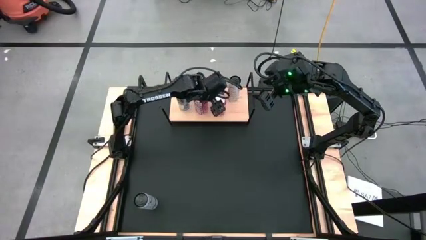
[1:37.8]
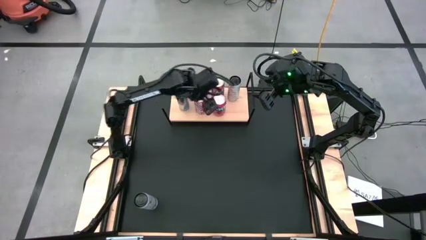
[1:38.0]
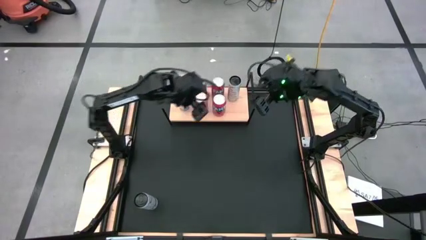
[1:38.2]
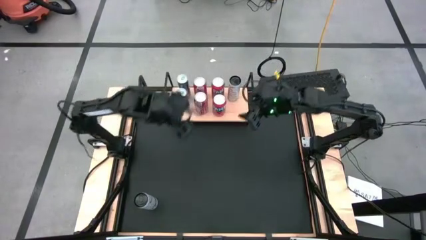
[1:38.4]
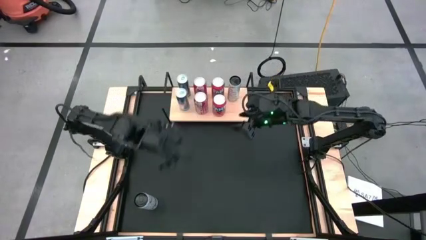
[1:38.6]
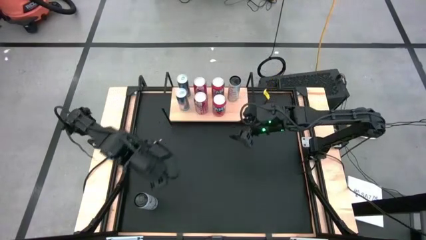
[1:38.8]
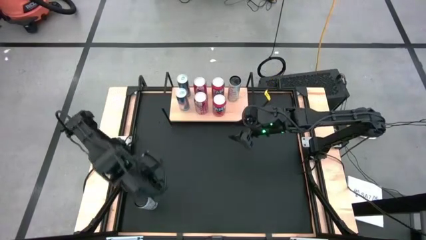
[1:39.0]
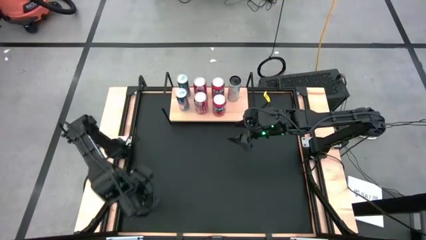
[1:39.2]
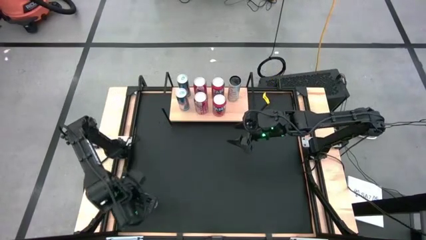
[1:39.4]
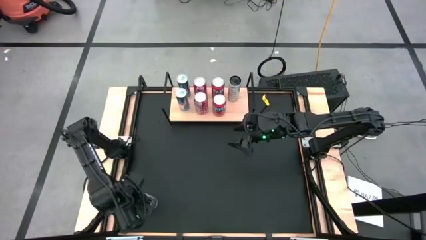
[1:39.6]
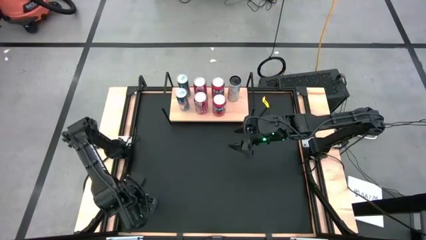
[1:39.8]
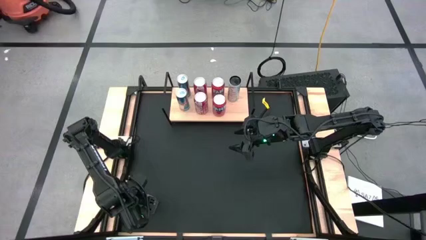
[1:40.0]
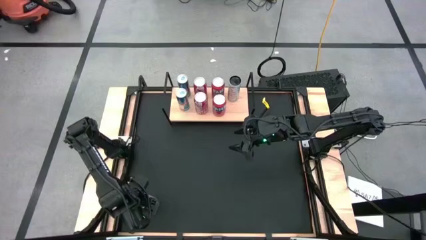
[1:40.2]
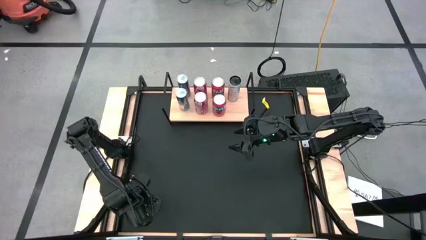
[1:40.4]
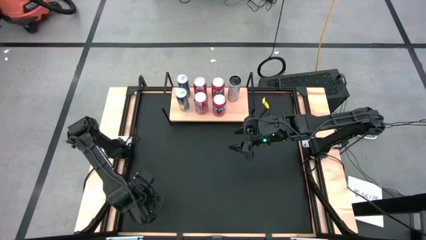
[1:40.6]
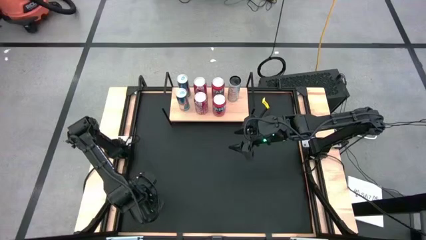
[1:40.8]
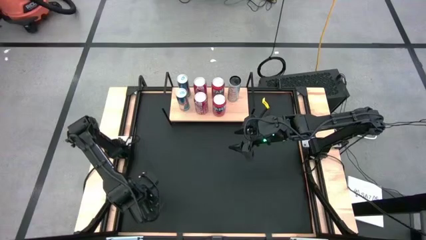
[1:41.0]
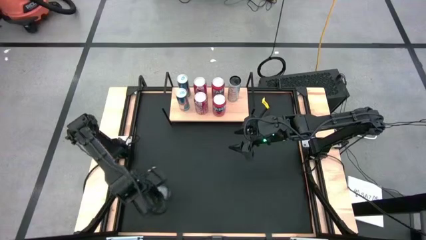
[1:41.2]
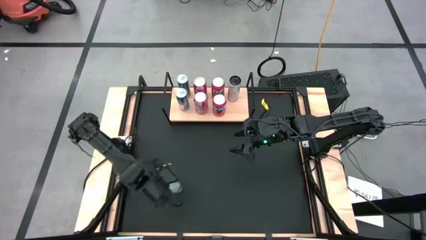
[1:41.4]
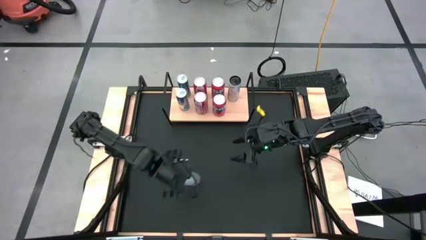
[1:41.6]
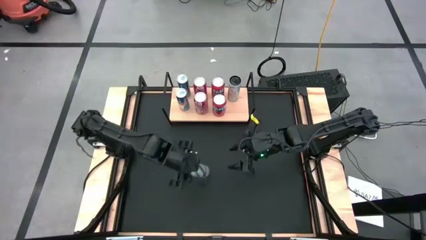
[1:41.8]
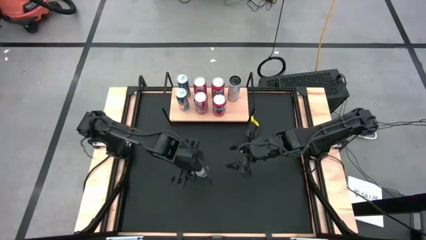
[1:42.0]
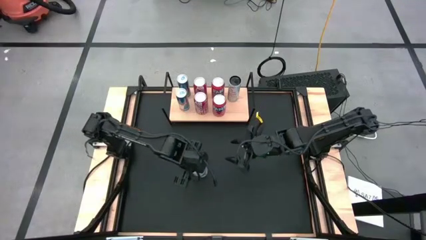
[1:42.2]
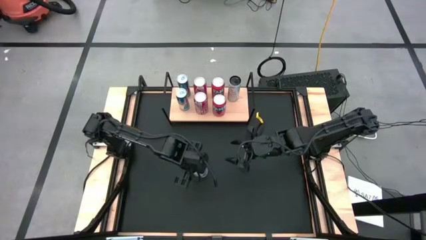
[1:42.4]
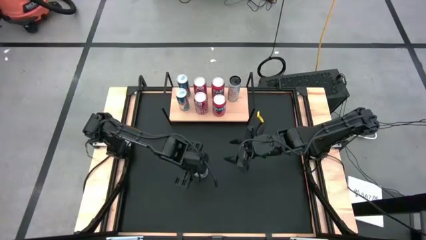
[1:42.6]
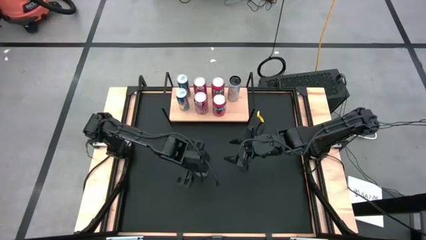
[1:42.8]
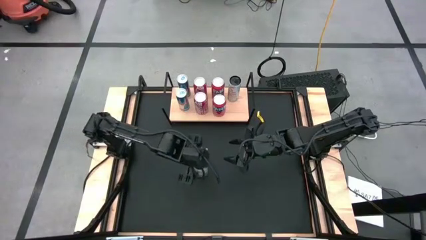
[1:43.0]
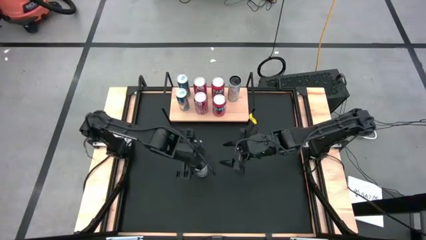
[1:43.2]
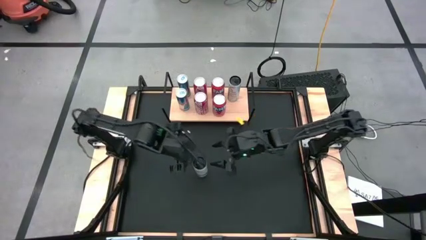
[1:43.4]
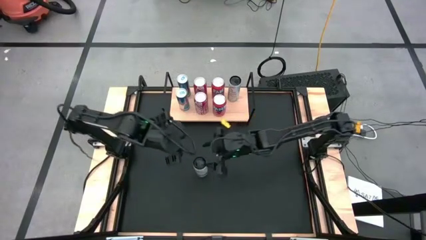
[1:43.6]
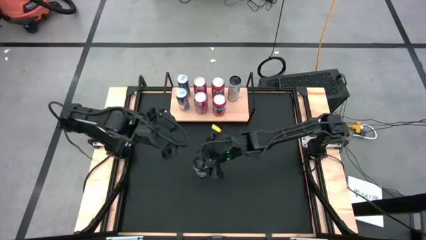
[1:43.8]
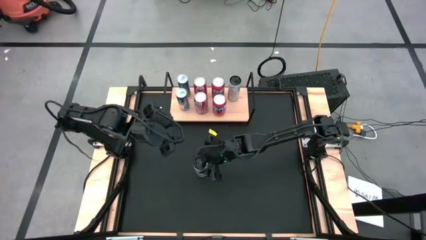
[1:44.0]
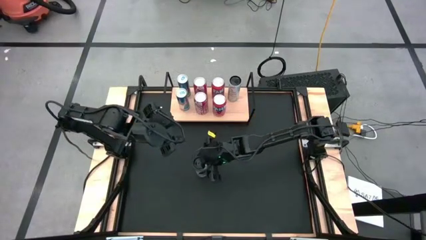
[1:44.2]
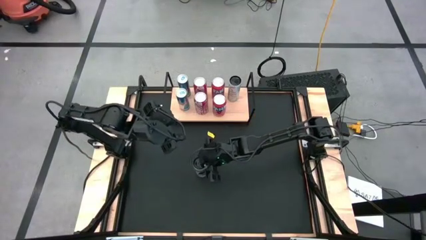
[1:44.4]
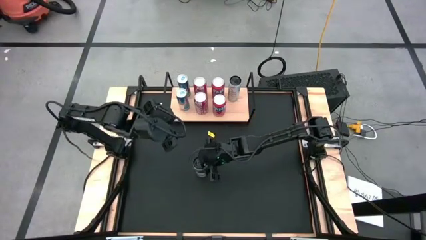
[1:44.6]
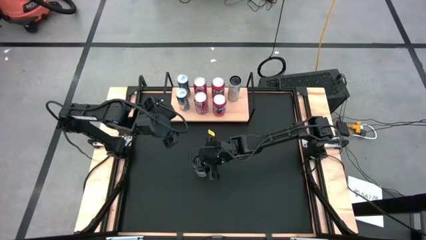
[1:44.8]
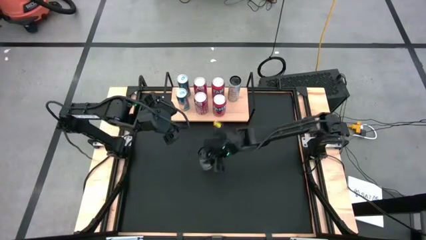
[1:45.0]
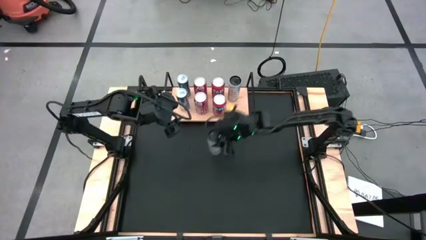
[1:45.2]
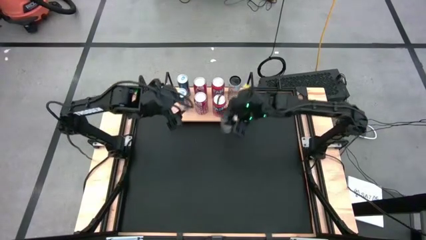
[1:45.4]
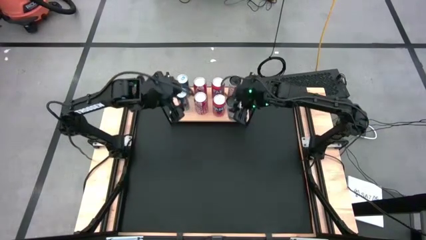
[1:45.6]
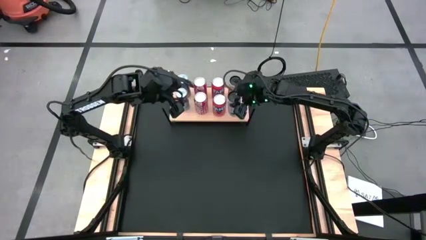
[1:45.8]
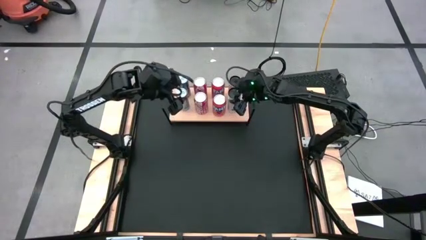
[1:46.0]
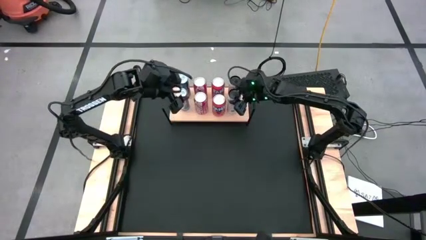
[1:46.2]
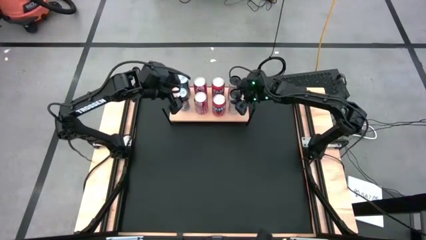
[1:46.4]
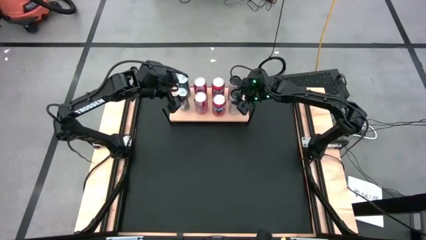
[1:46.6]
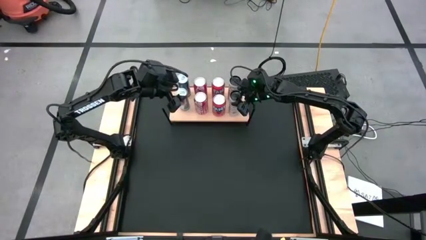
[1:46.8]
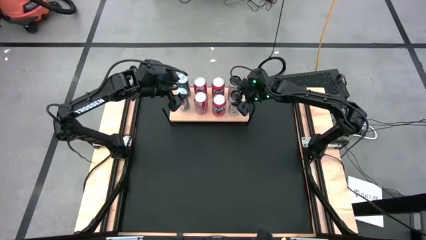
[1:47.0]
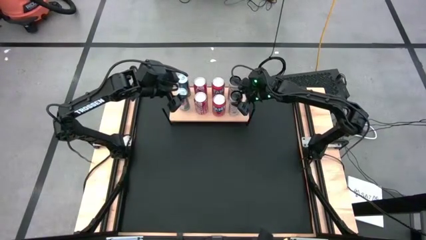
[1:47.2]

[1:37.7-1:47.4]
Task: Place canned beverage on shelf
Put the white-yellow soda can on the shelf aligned with the other white-yellow soda can on the shelf

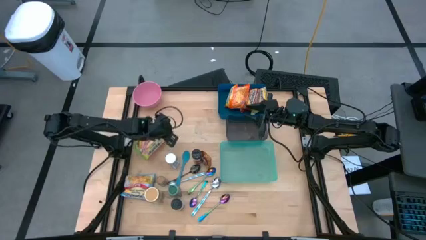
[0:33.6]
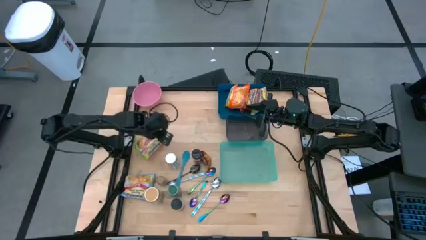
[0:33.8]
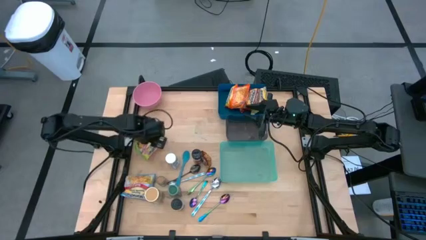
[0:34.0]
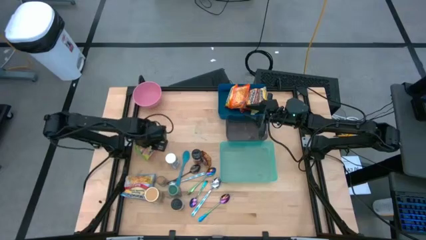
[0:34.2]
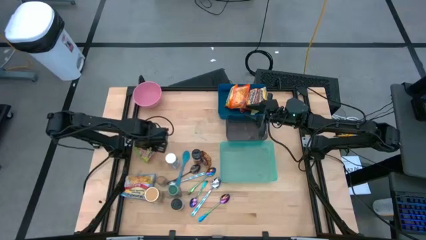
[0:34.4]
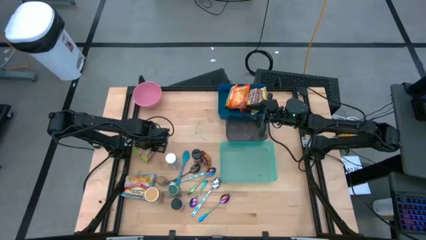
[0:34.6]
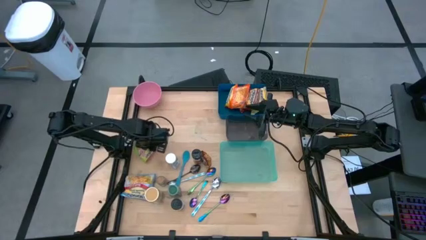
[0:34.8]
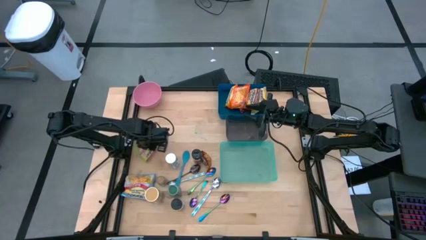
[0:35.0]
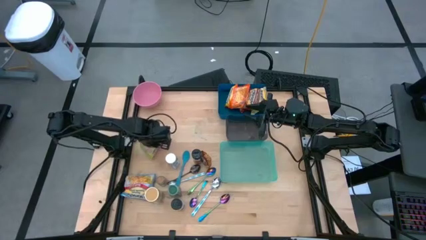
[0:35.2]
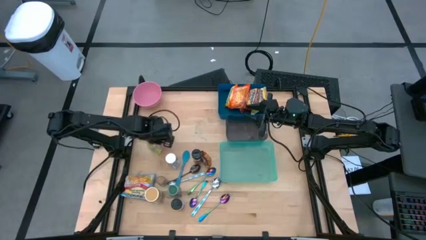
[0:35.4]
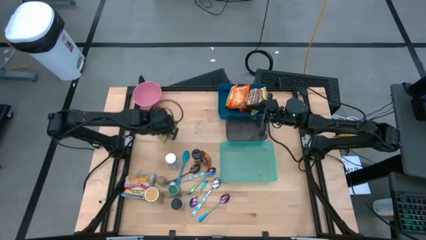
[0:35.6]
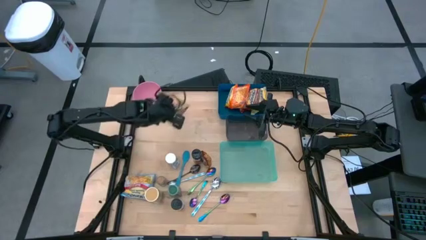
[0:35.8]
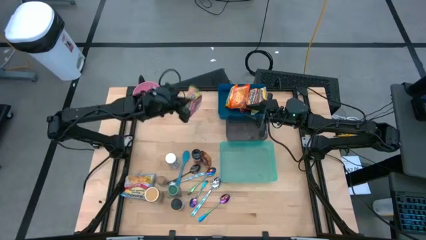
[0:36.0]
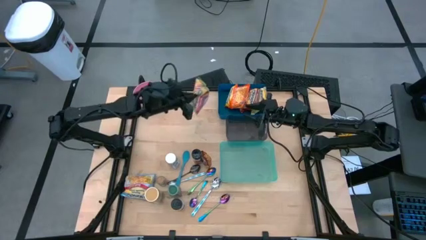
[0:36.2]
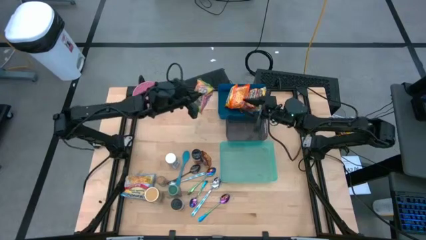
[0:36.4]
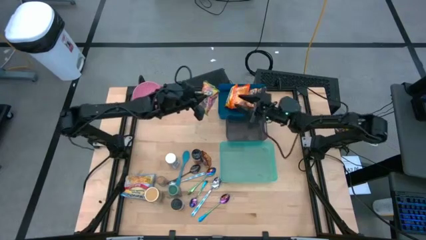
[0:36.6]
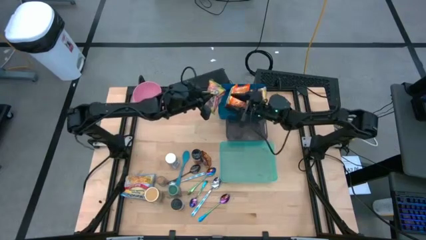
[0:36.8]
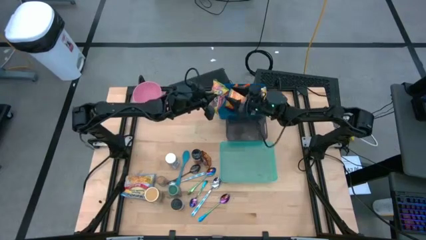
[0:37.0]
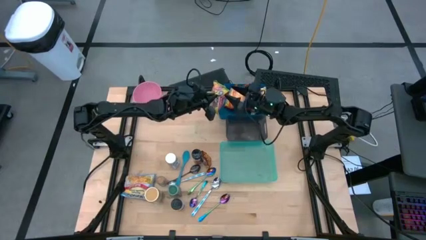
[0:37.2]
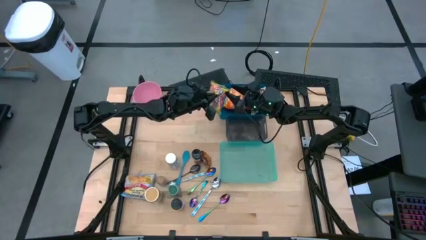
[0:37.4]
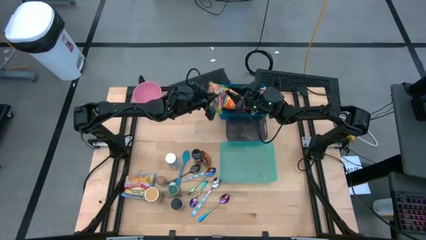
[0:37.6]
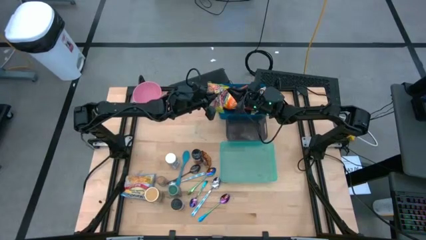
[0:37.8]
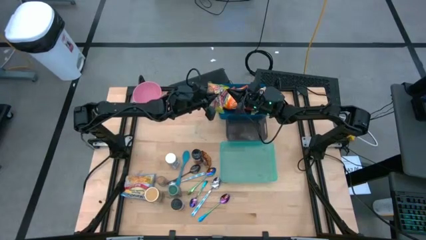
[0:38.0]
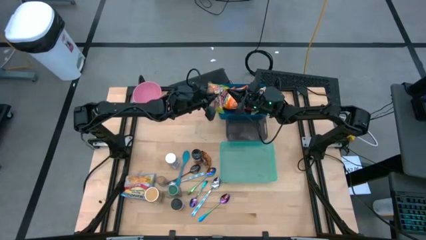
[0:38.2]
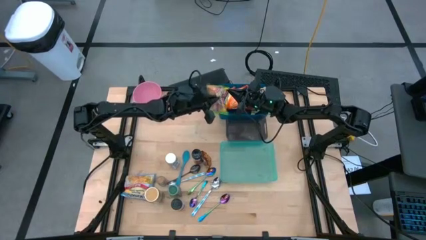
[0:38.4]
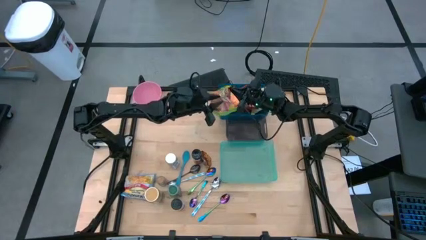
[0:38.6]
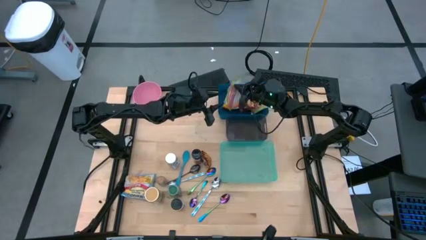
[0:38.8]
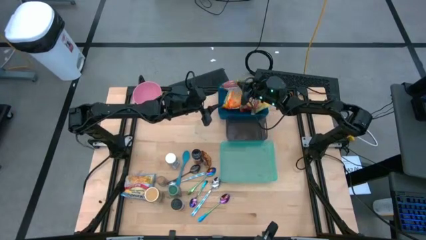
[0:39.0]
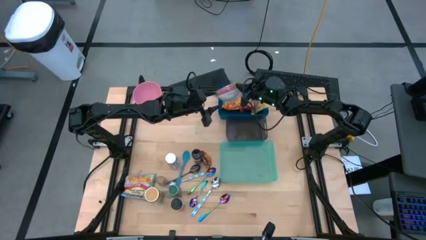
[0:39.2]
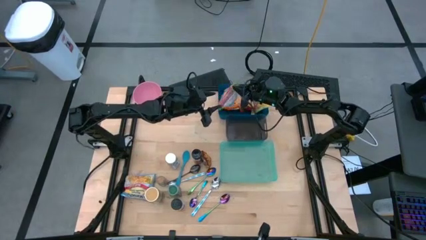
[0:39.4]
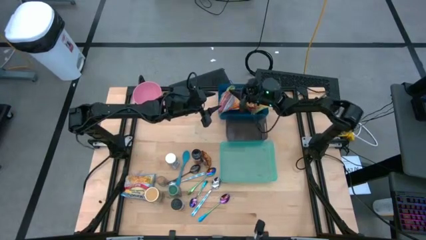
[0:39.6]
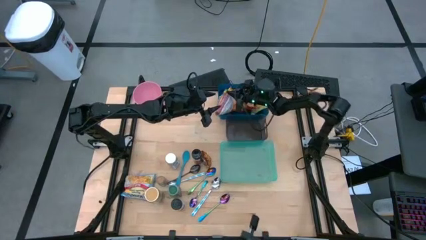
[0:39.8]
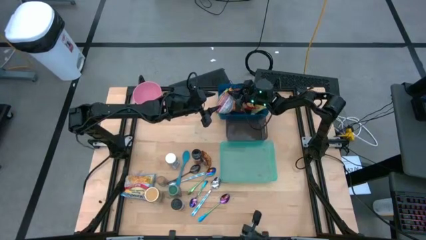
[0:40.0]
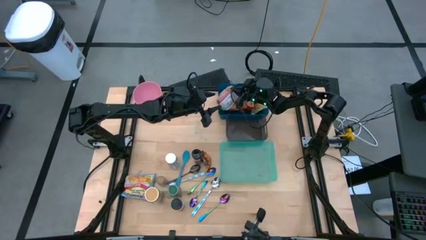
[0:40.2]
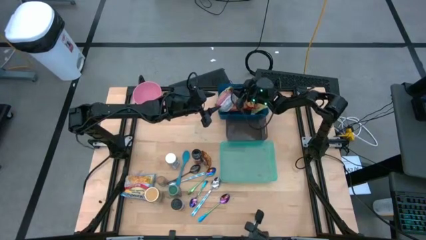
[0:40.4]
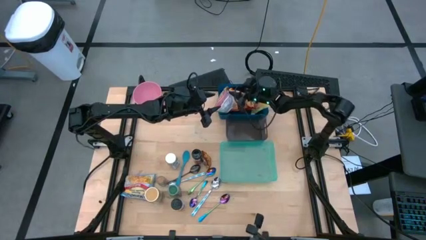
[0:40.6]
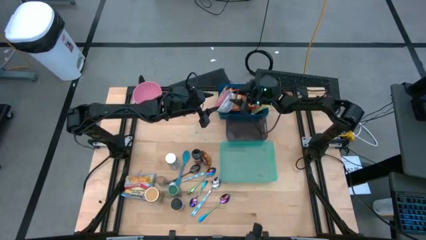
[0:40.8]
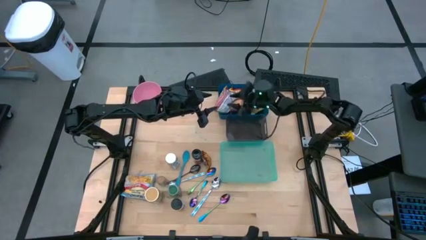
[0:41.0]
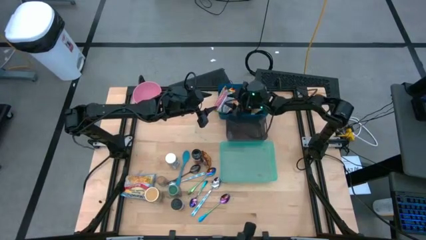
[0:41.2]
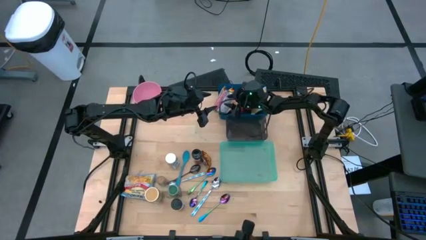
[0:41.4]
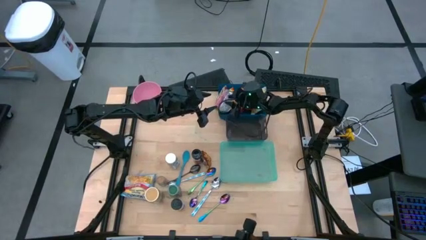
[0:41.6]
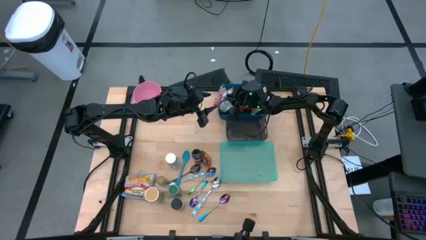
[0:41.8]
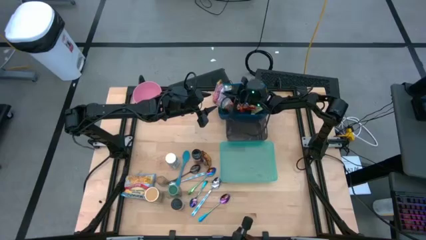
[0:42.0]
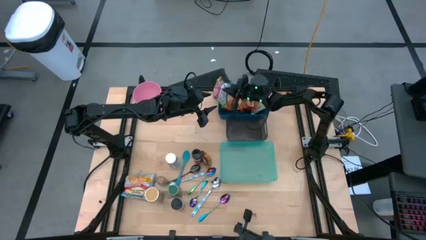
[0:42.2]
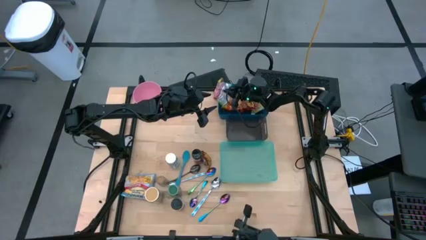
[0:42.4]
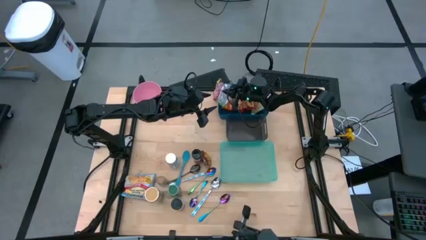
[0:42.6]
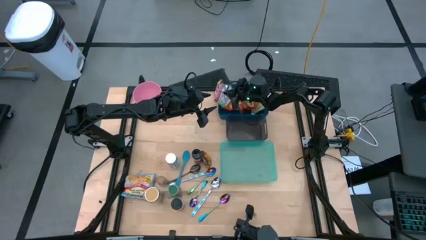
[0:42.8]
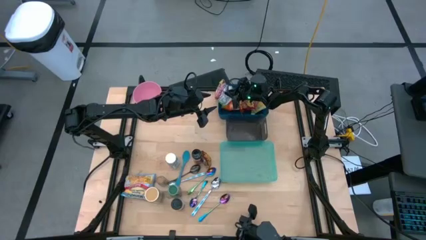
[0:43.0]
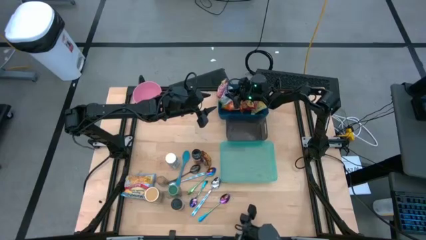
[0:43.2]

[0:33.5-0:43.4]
Task: Pick & Place Food Item
Put the green noodle pack into the blue bin
